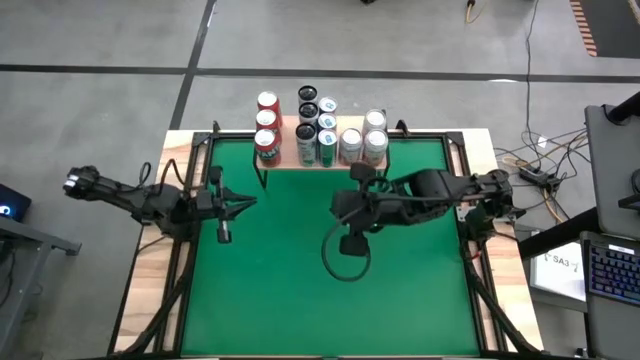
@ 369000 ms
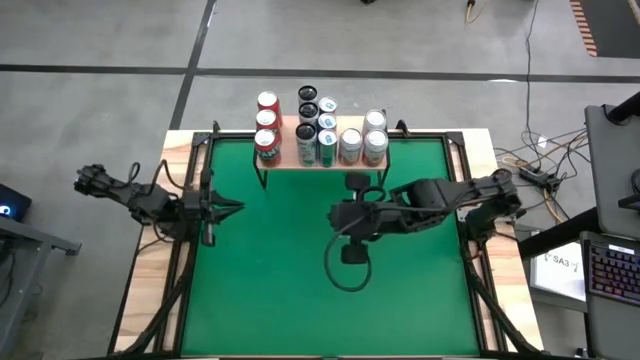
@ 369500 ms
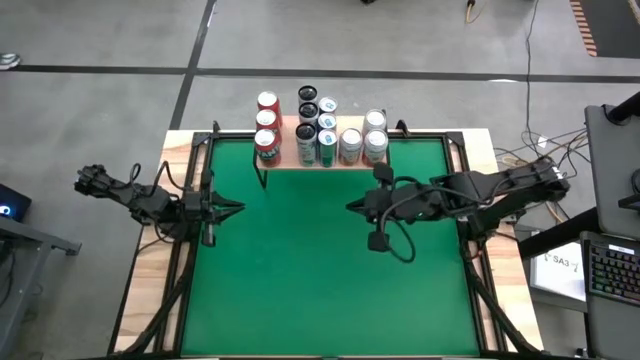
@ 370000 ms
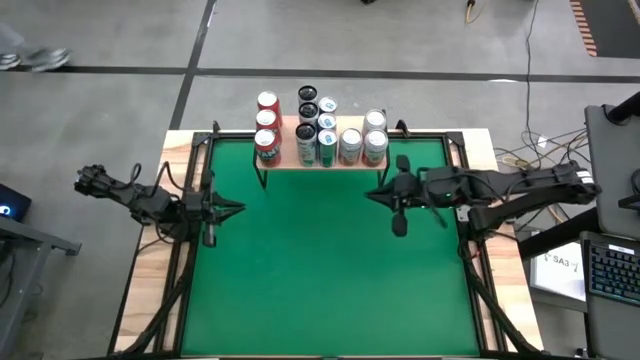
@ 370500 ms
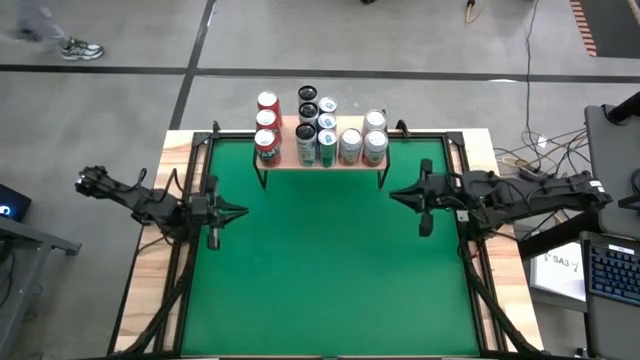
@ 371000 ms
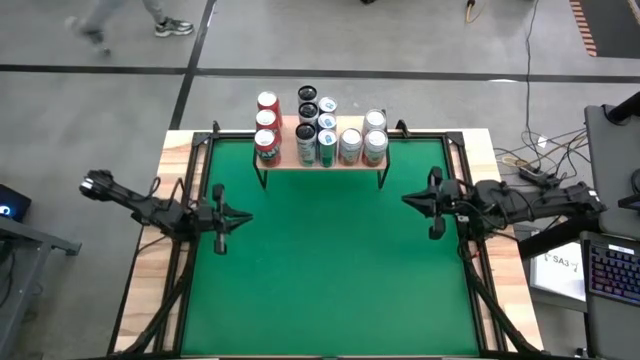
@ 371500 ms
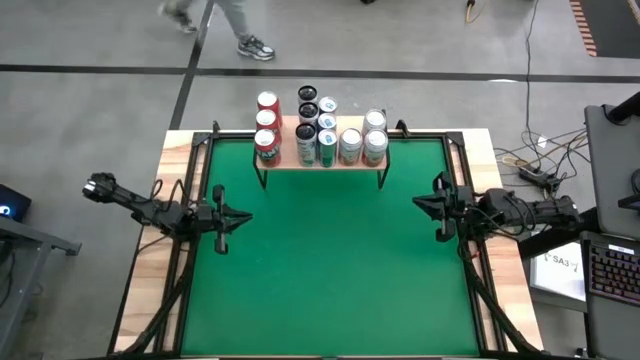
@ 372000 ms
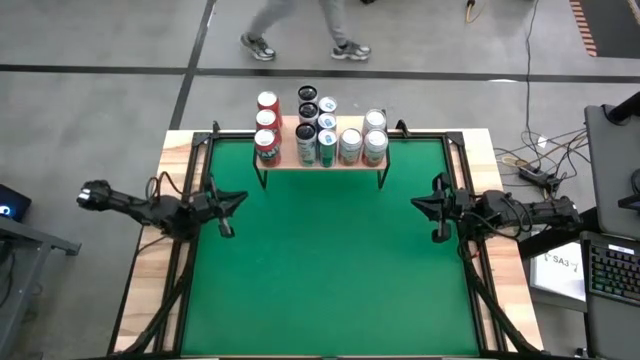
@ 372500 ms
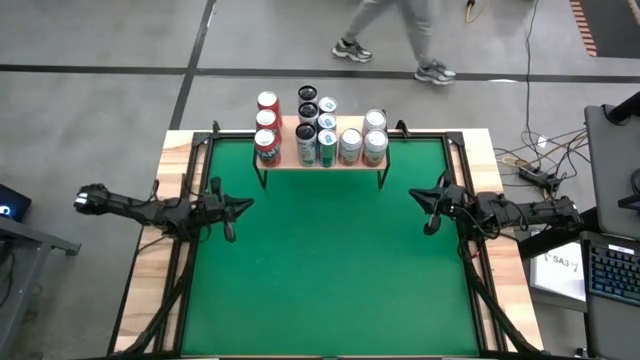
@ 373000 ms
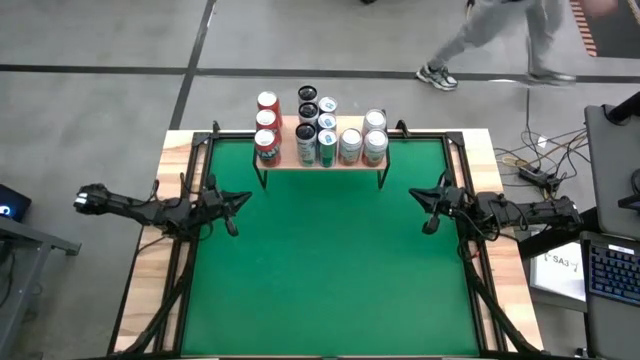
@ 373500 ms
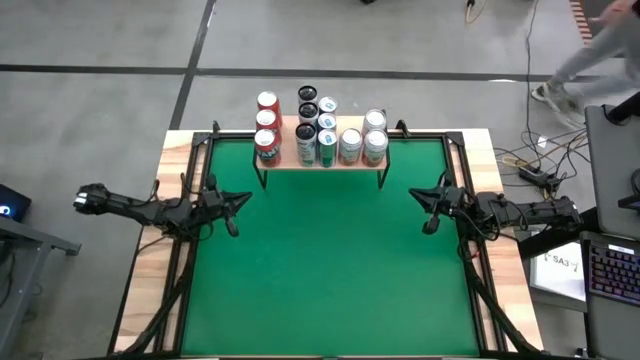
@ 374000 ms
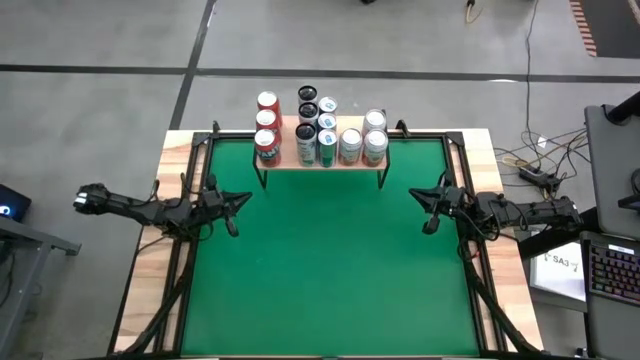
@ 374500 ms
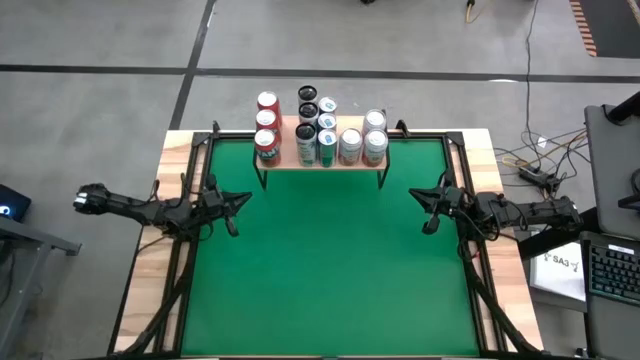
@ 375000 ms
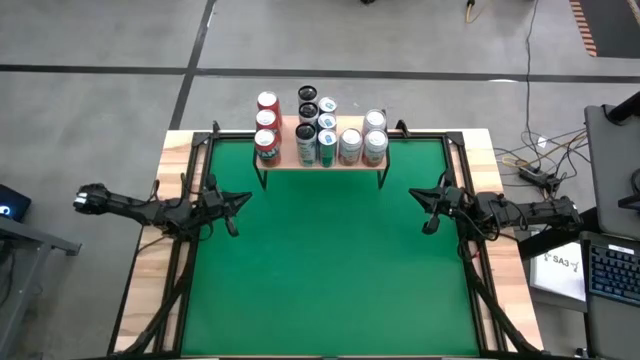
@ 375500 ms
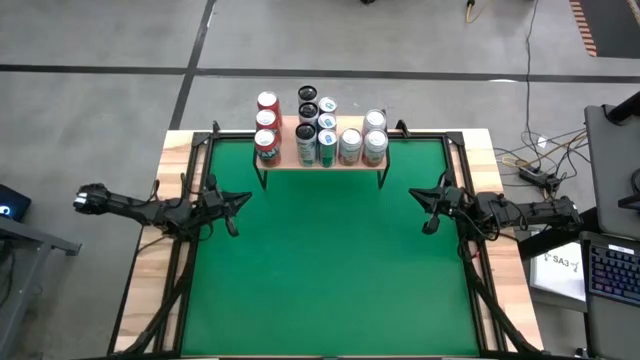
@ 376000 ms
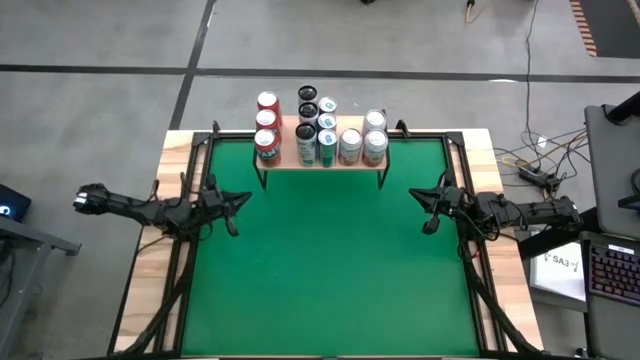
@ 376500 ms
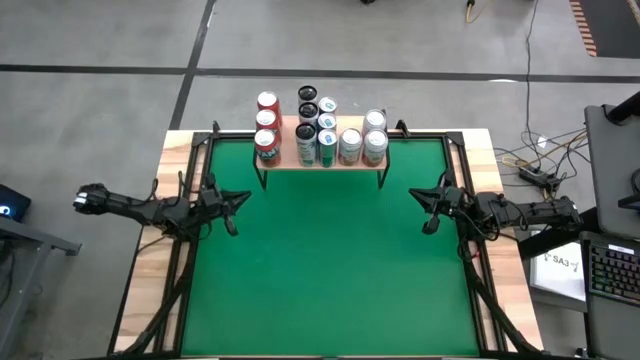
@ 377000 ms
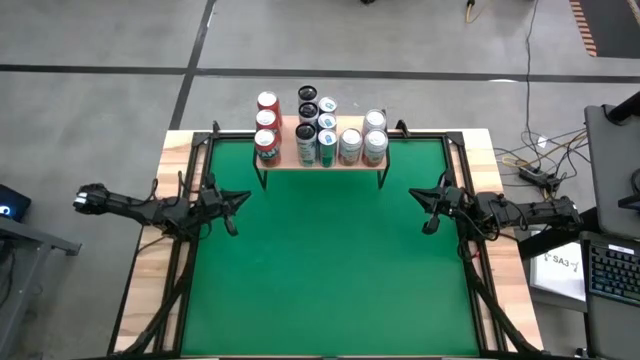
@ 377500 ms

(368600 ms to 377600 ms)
Task: Place canned beverage on shelf
Return to Home Position

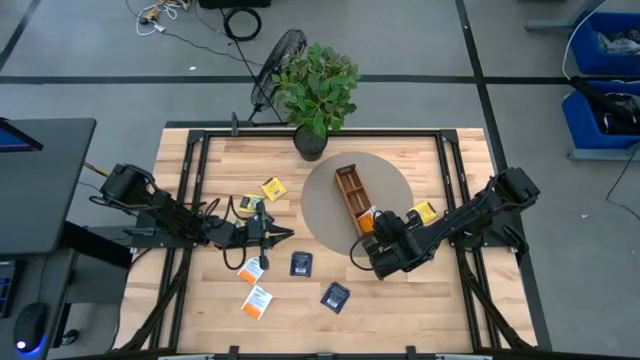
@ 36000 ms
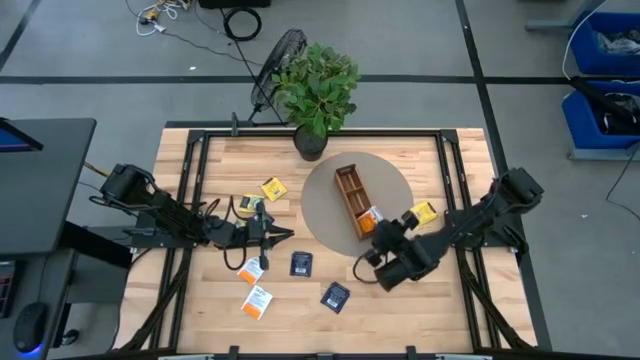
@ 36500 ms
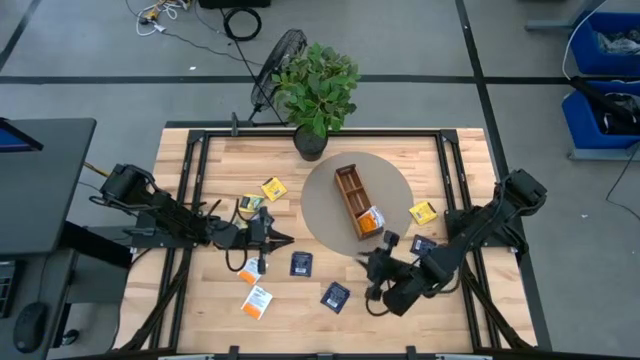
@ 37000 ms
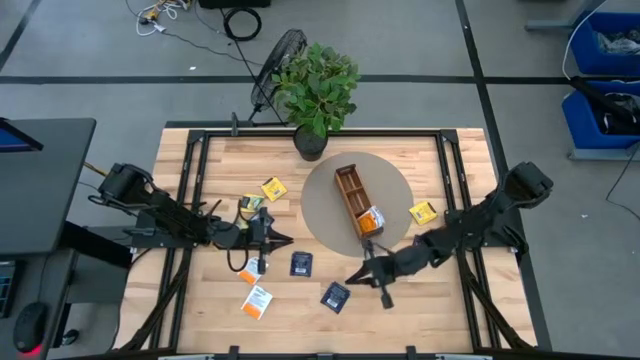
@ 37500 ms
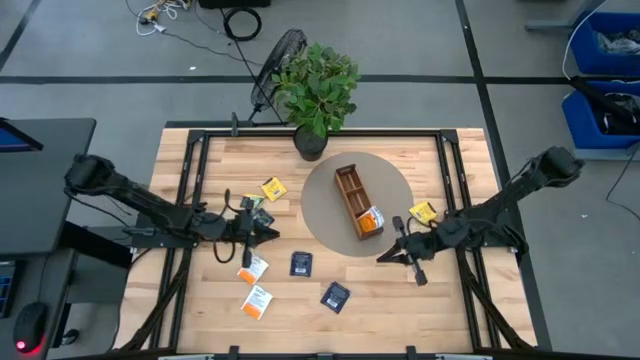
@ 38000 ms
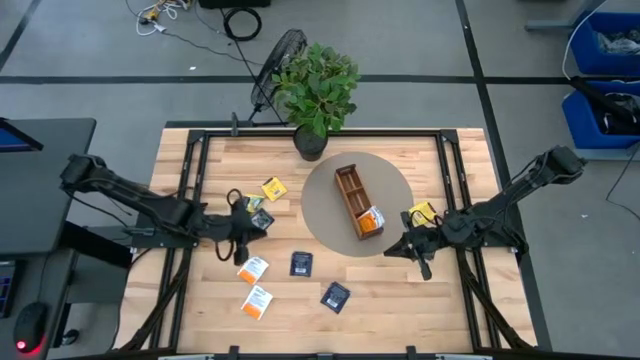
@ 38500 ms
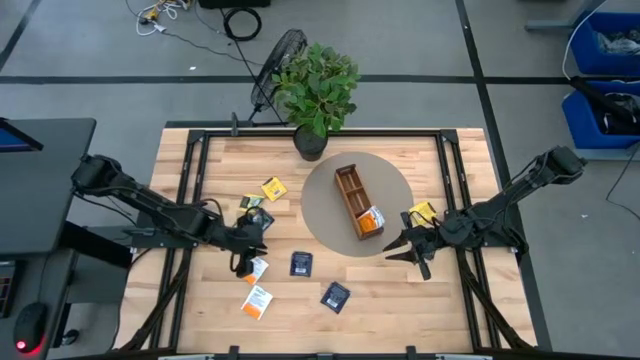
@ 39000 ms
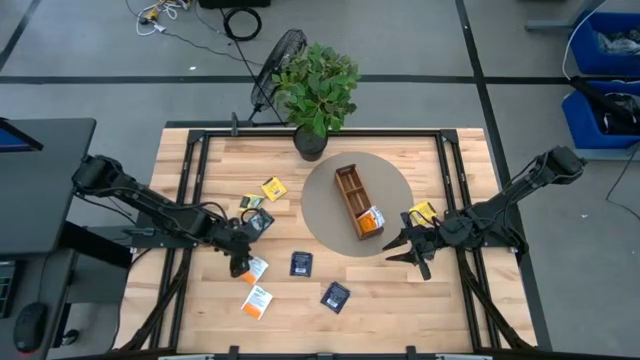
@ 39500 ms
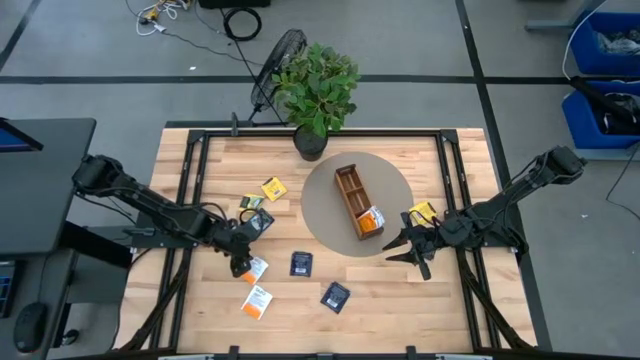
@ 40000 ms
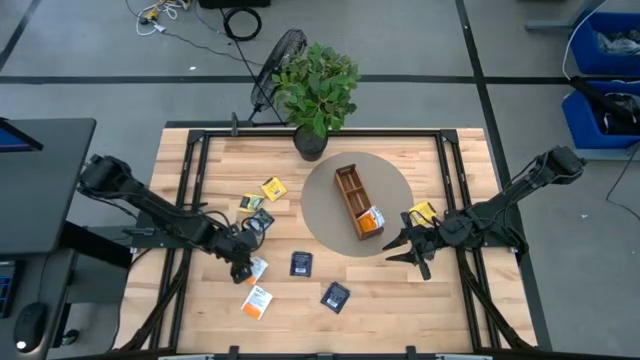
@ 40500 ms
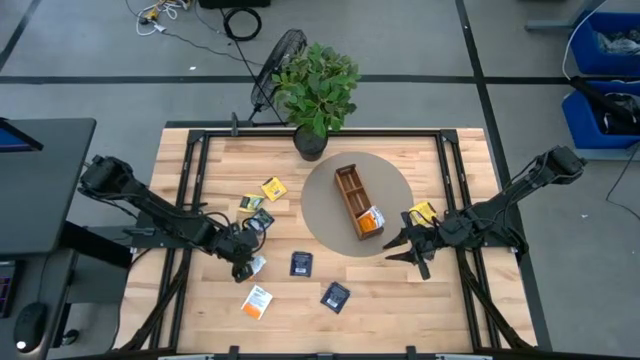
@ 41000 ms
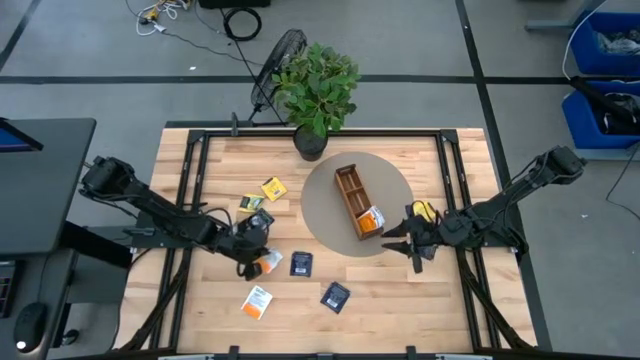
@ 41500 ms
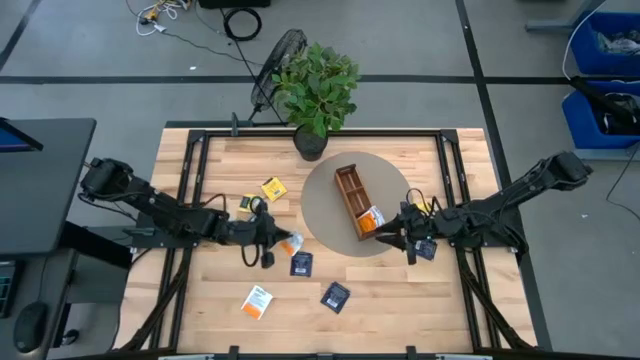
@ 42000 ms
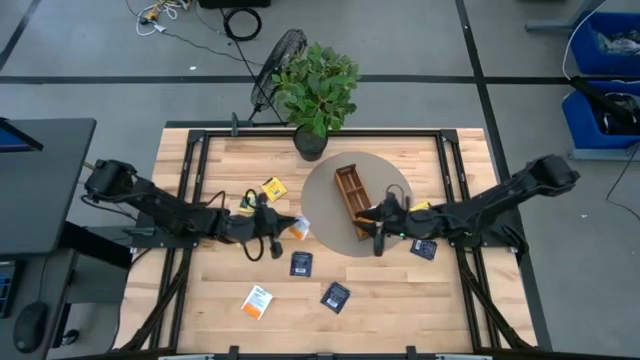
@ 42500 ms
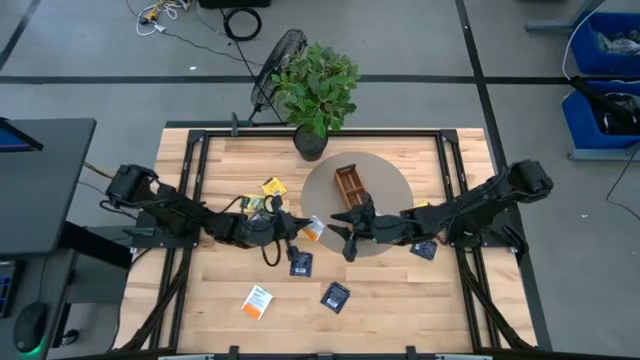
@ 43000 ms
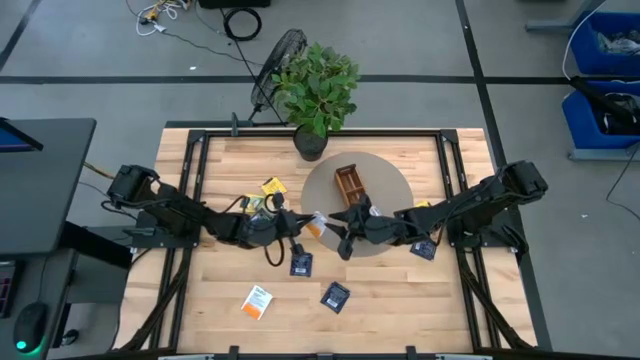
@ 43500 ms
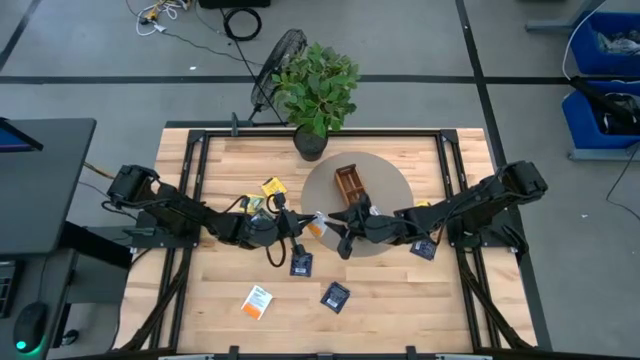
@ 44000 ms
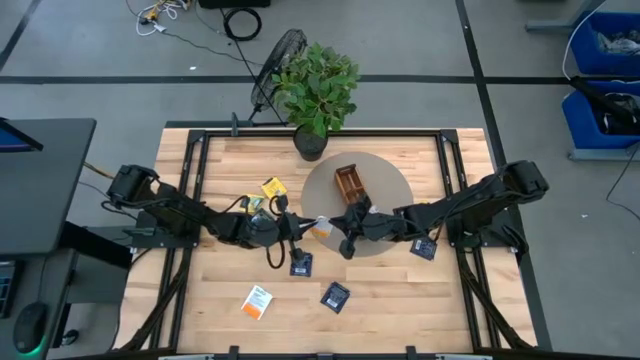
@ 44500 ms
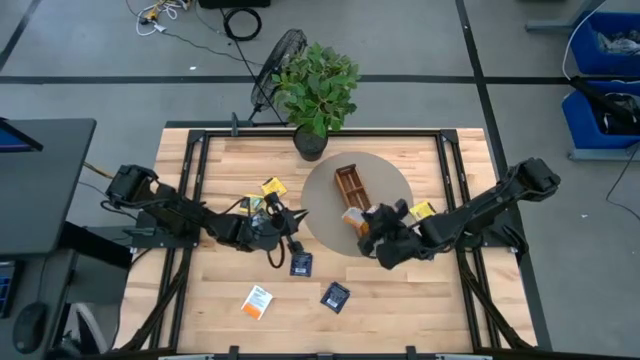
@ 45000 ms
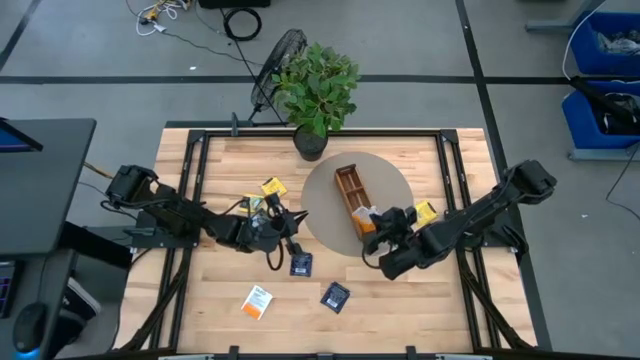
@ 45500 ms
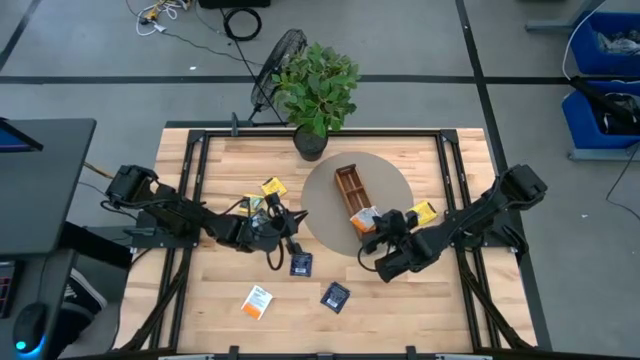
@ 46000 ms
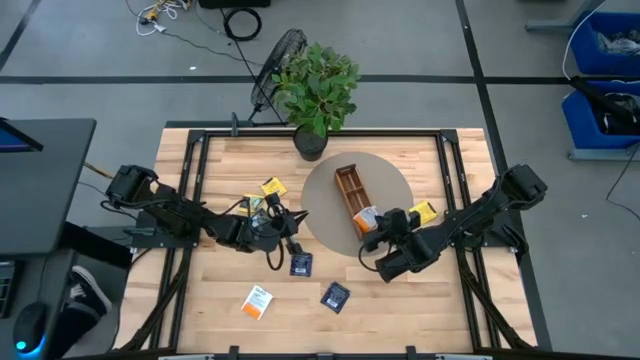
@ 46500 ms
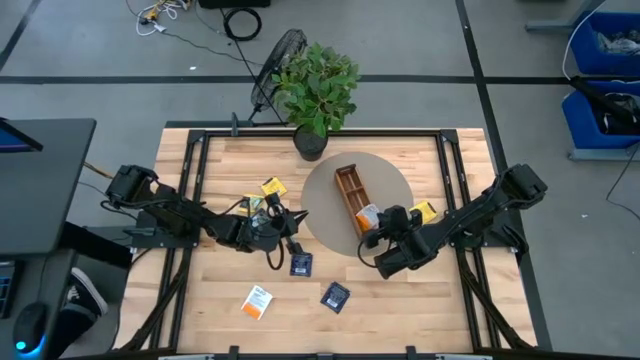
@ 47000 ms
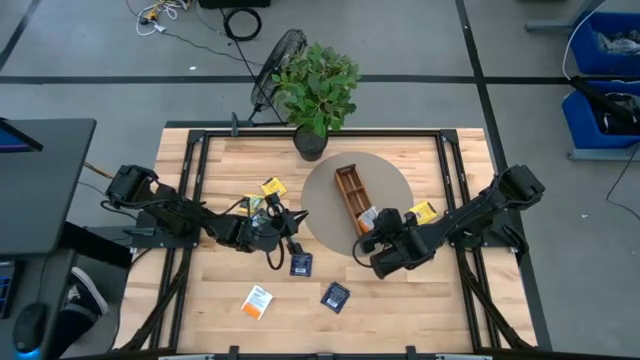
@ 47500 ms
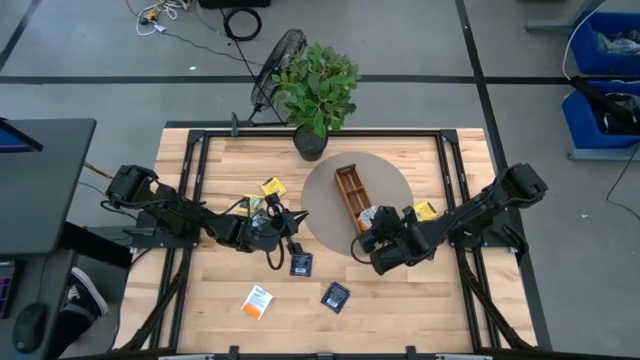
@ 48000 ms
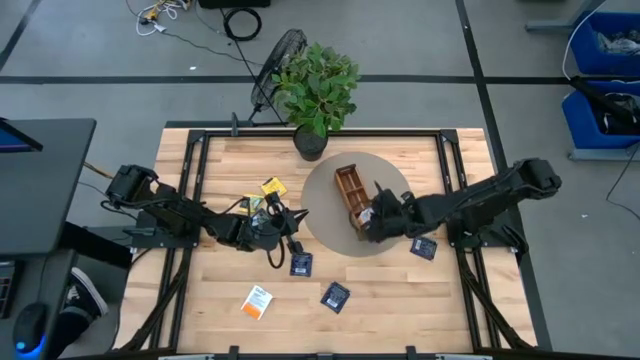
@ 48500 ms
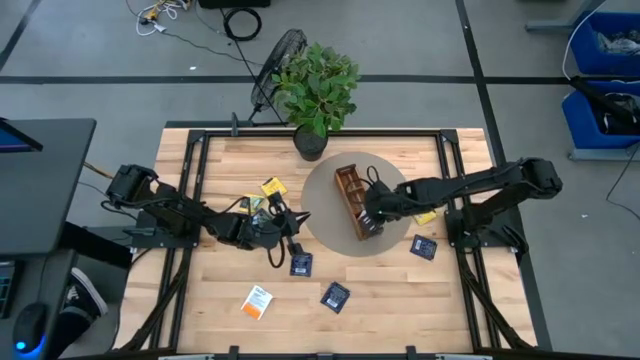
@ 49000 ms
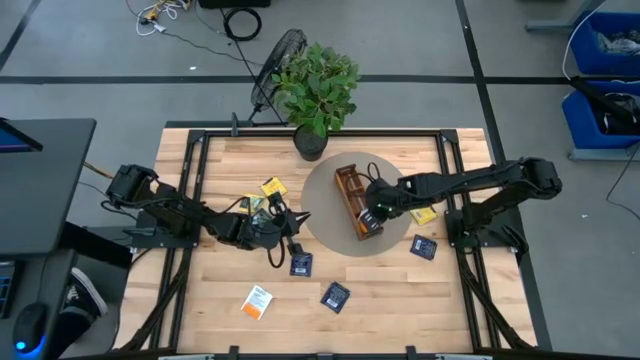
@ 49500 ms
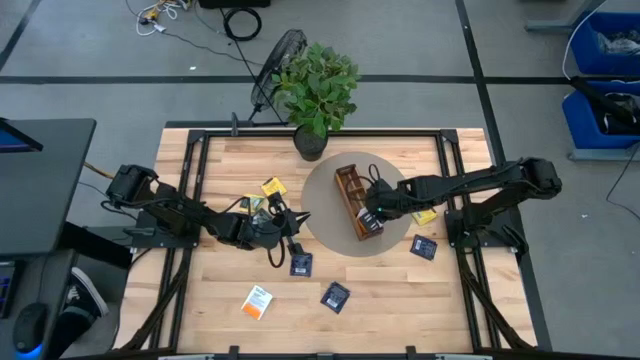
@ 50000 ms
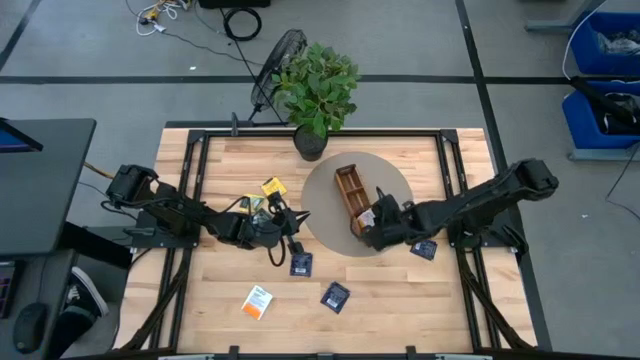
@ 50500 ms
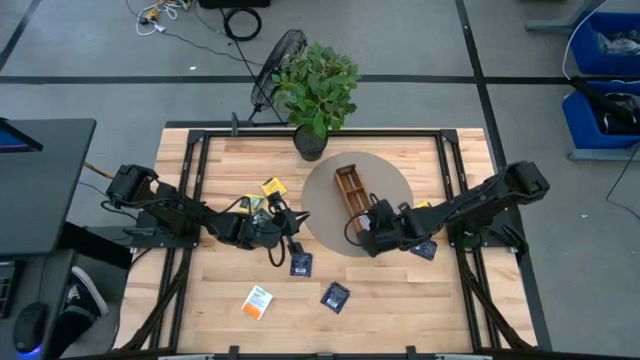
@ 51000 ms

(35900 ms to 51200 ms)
Task: Pick & Place Tea
Put the white tea bag into the bottom section of the wooden organizer
